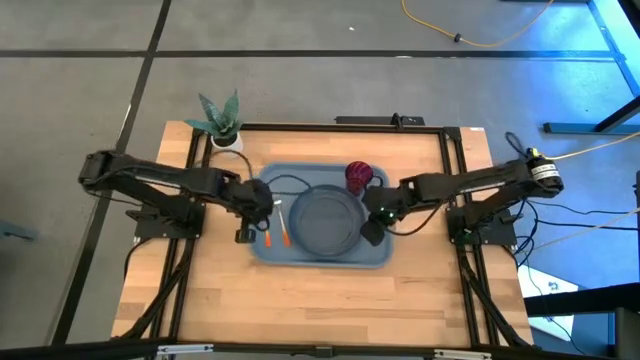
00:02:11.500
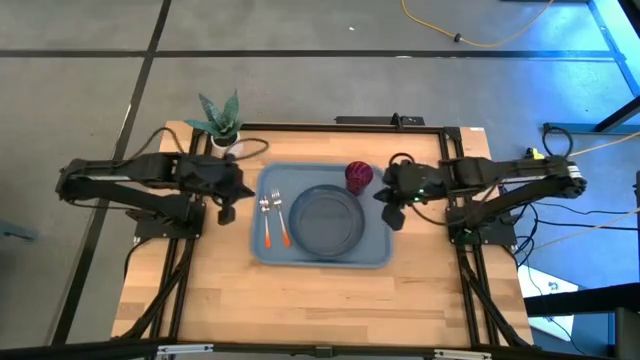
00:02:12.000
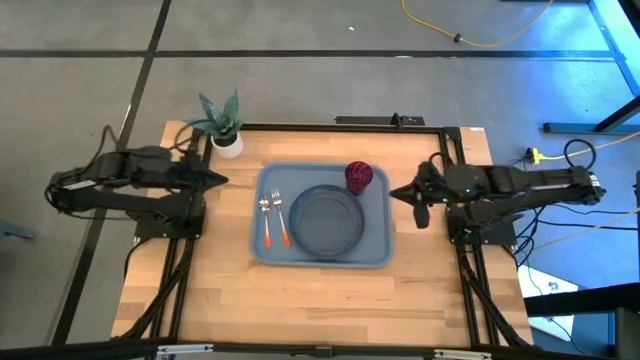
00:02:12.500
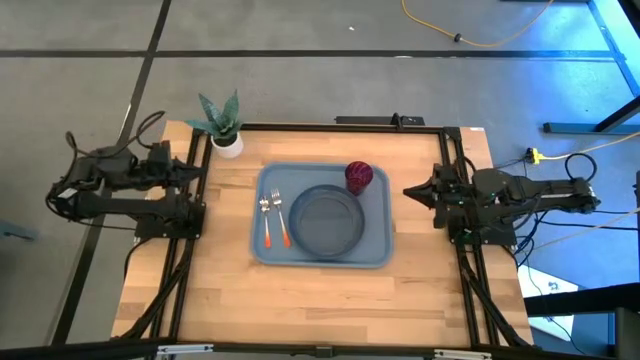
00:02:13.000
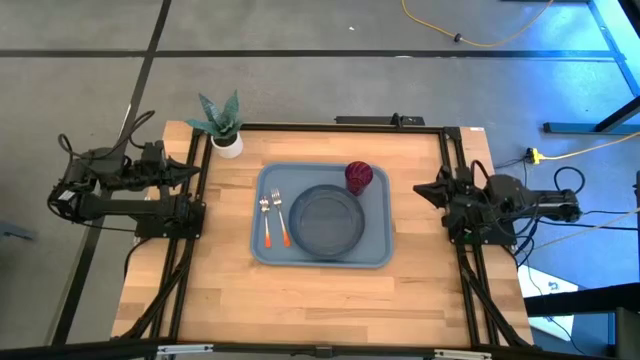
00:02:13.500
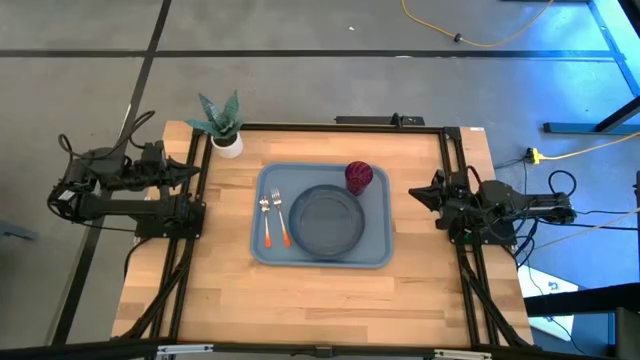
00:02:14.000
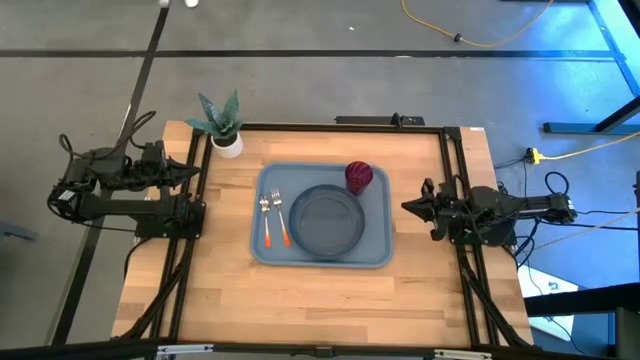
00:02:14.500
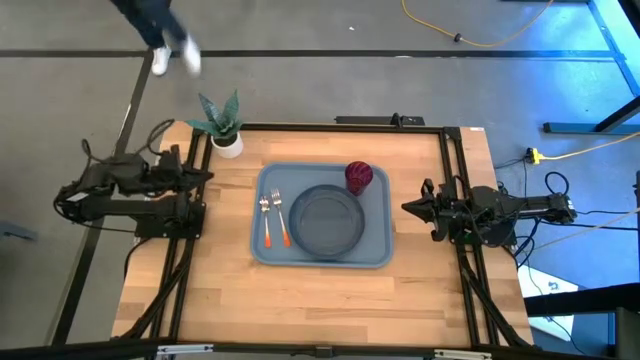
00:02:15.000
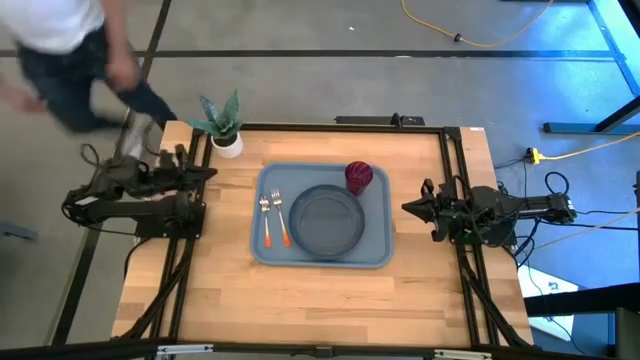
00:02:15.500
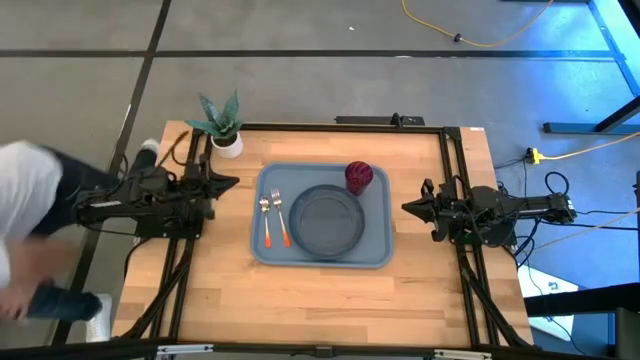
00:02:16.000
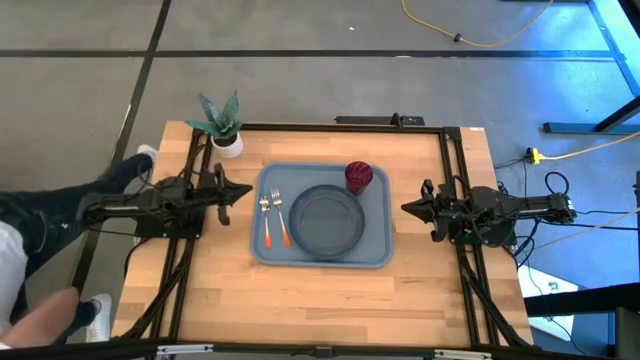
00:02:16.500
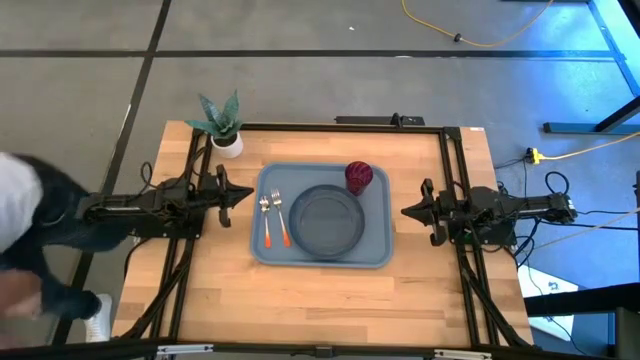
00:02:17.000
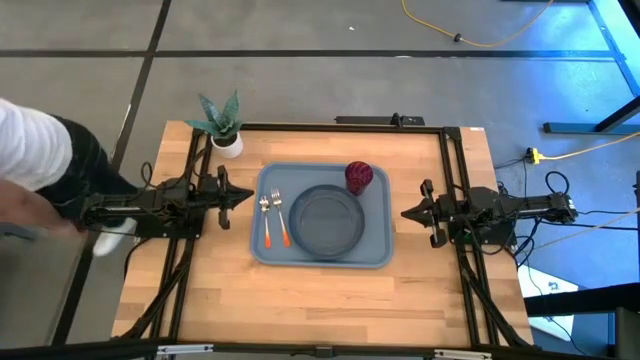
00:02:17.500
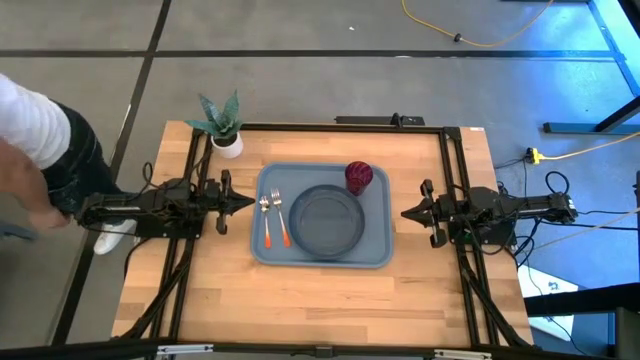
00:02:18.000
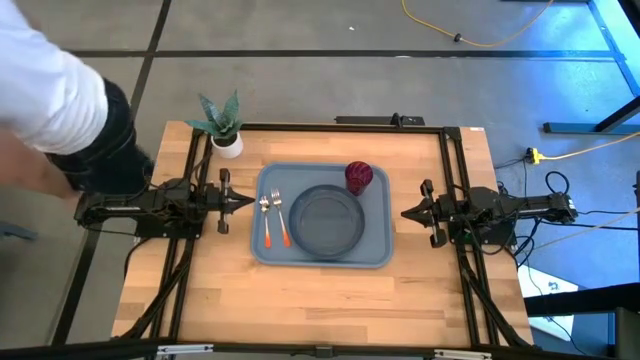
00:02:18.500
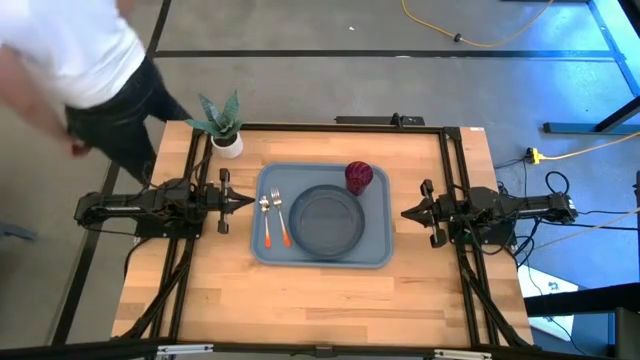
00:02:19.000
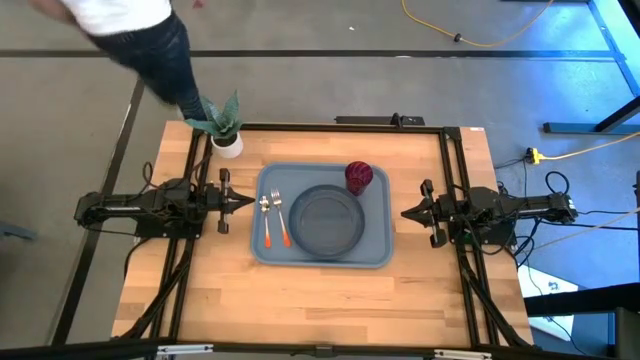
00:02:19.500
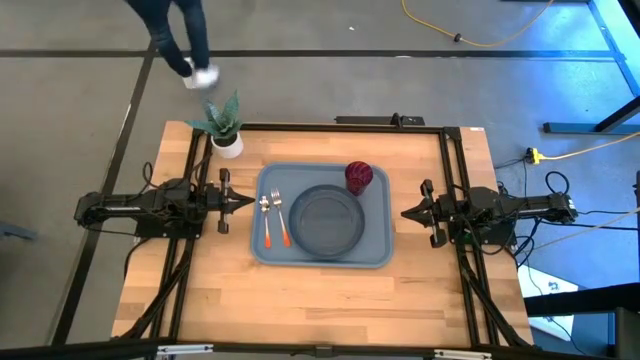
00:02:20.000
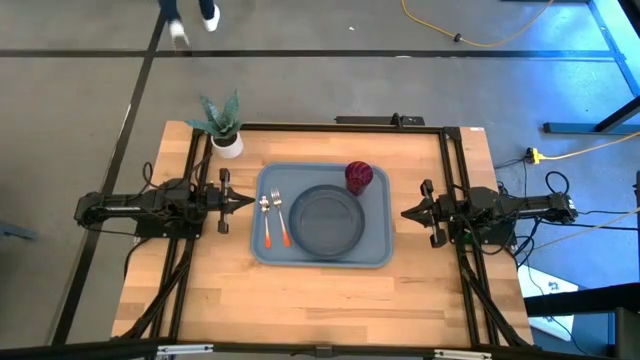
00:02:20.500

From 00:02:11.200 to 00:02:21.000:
Task: Pick and place plate/cup/fork/spoon on tray
Return to Home Position

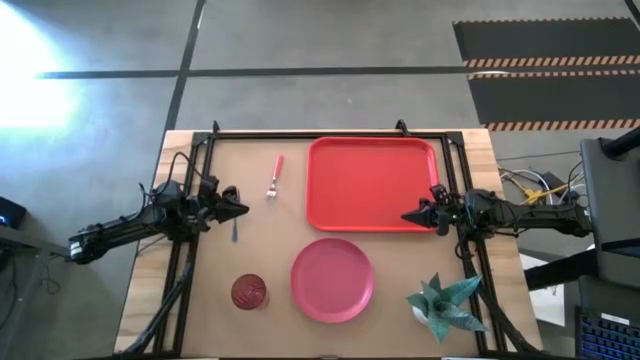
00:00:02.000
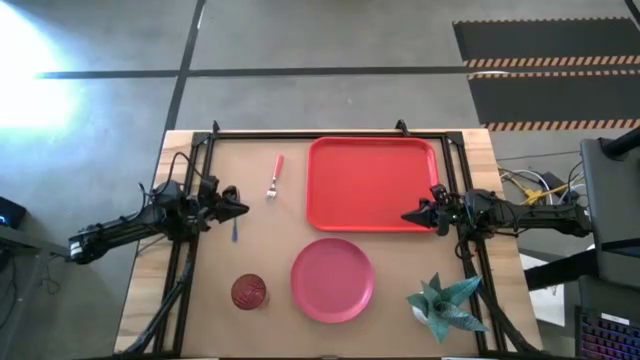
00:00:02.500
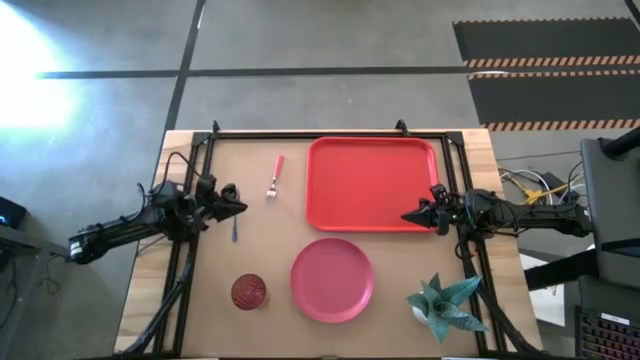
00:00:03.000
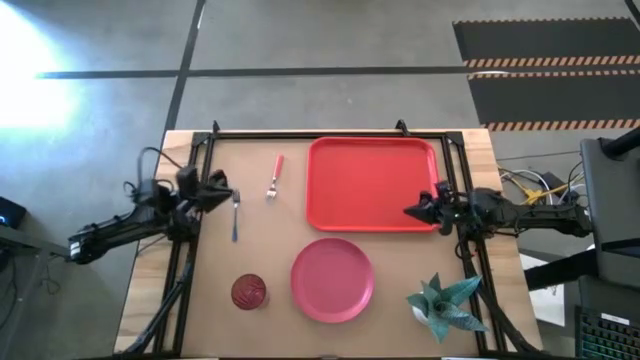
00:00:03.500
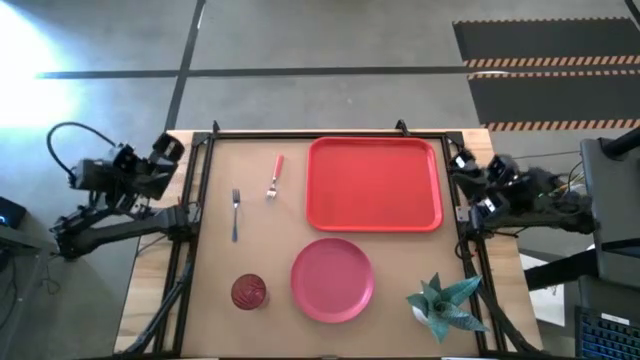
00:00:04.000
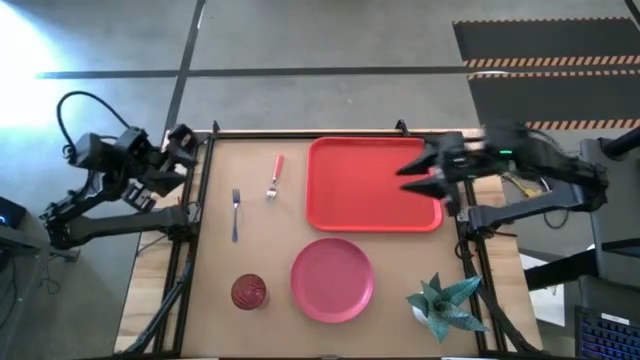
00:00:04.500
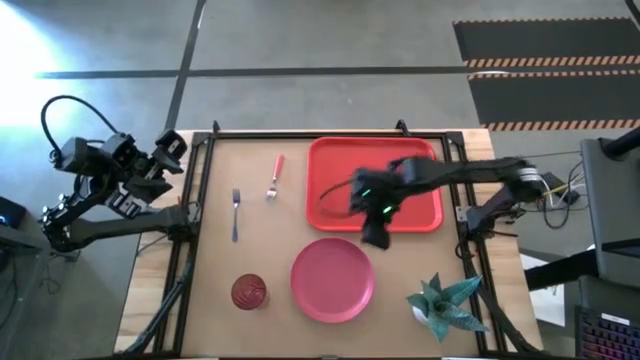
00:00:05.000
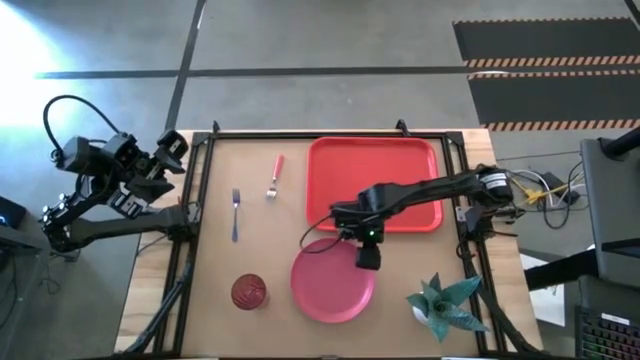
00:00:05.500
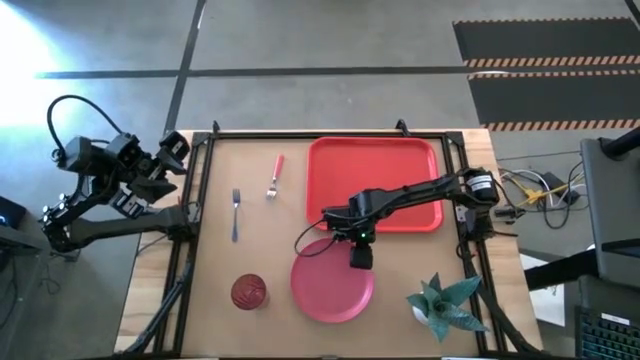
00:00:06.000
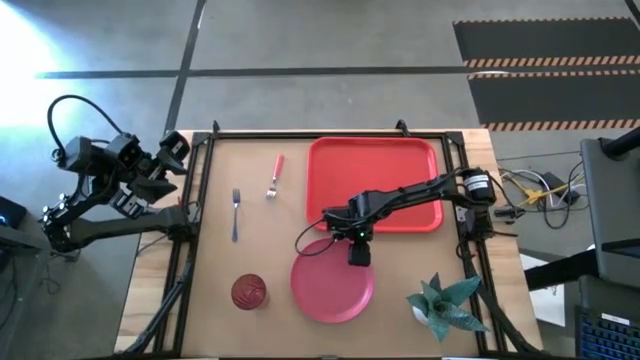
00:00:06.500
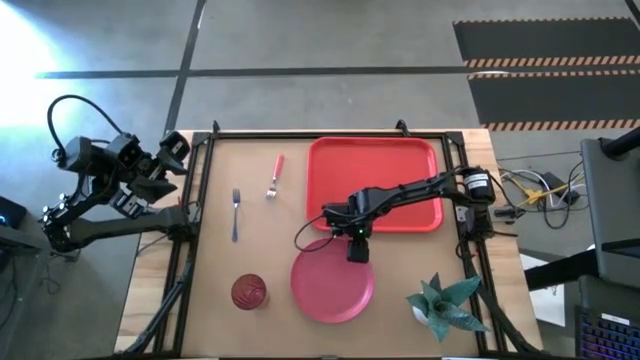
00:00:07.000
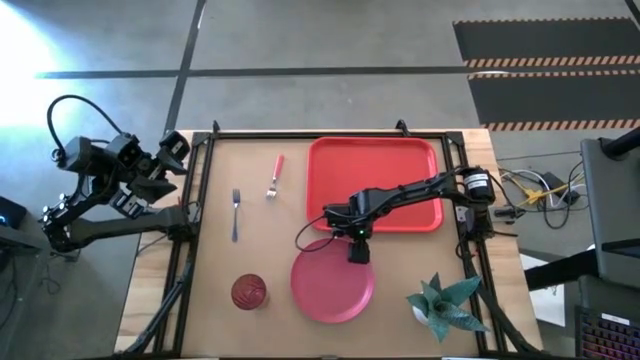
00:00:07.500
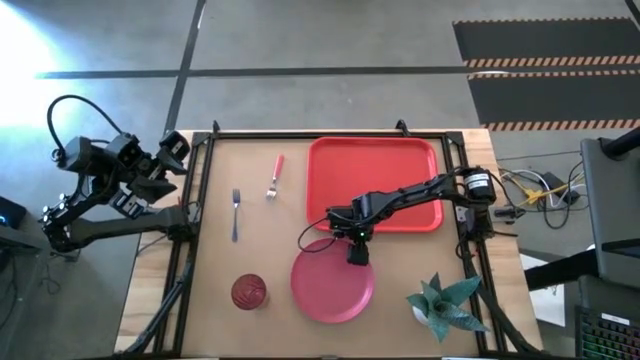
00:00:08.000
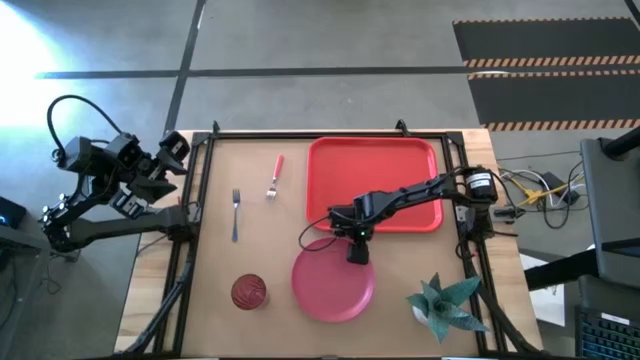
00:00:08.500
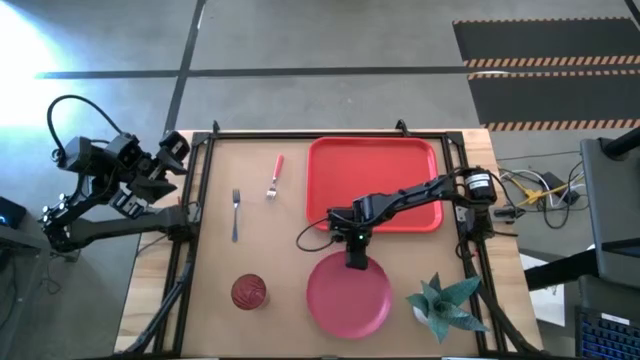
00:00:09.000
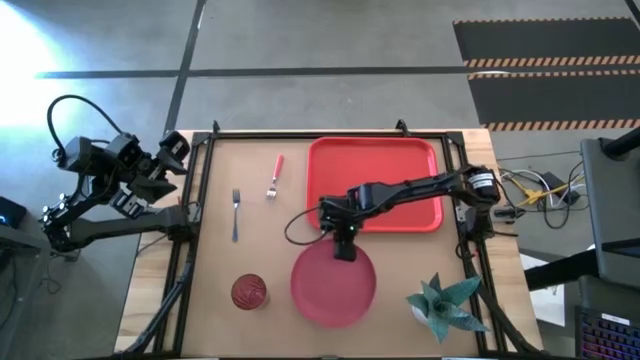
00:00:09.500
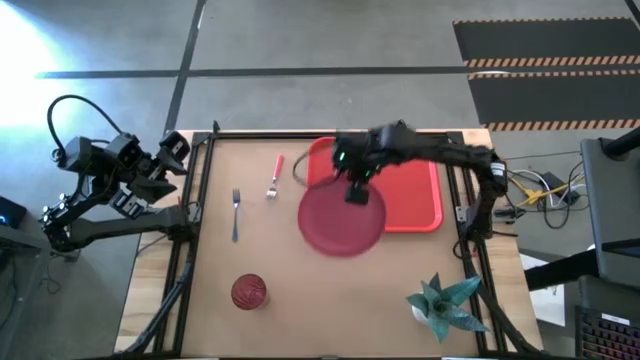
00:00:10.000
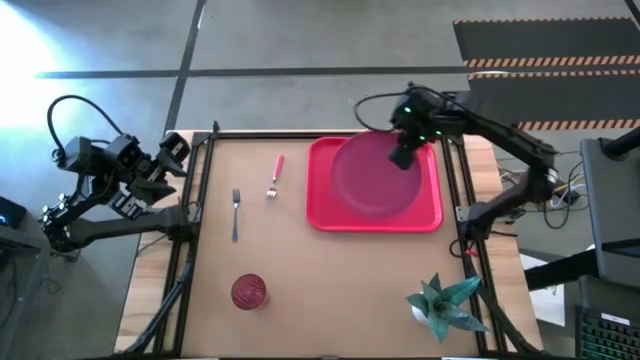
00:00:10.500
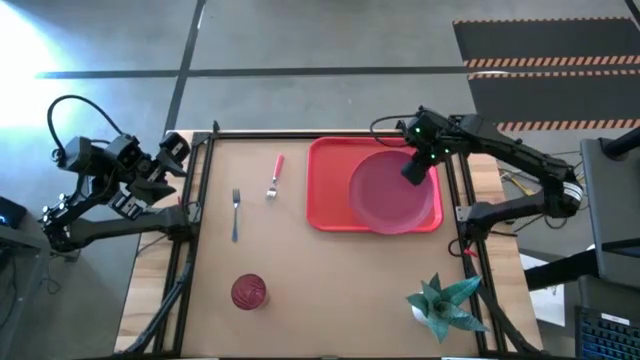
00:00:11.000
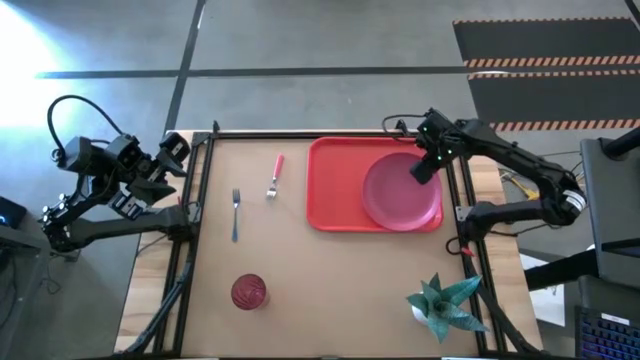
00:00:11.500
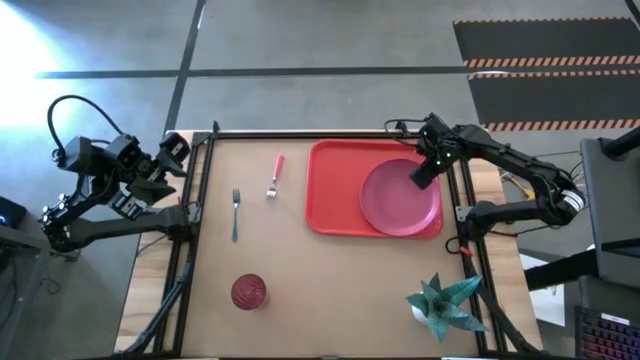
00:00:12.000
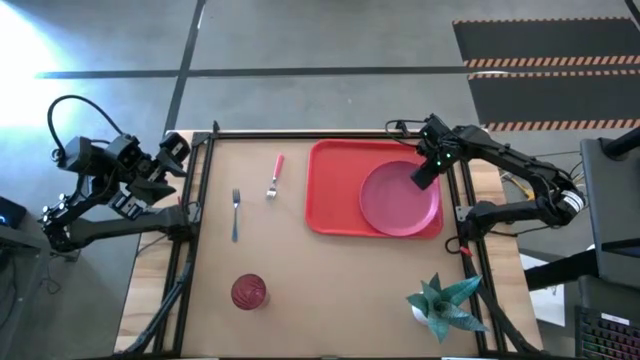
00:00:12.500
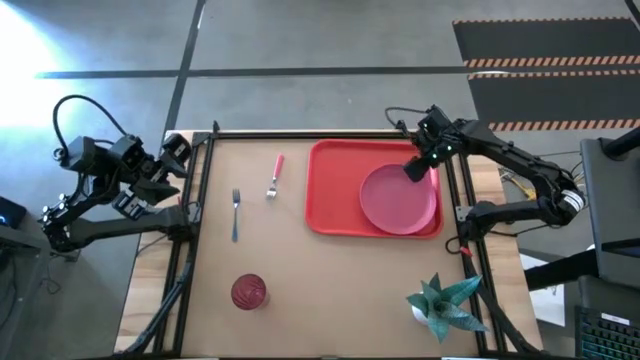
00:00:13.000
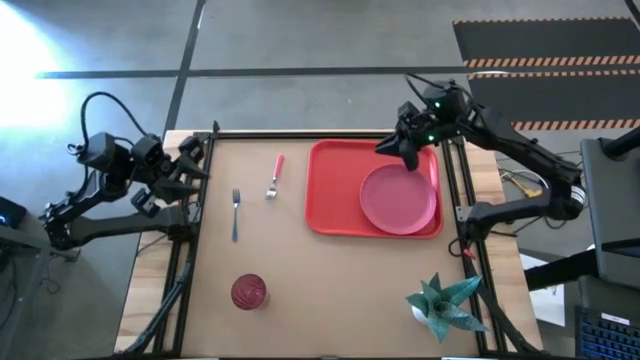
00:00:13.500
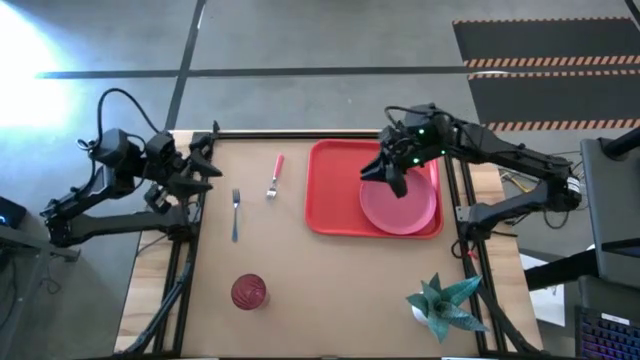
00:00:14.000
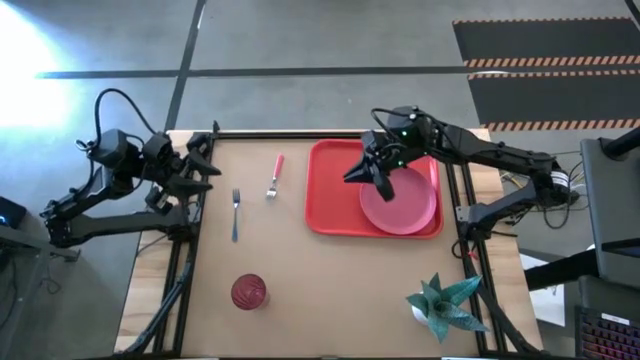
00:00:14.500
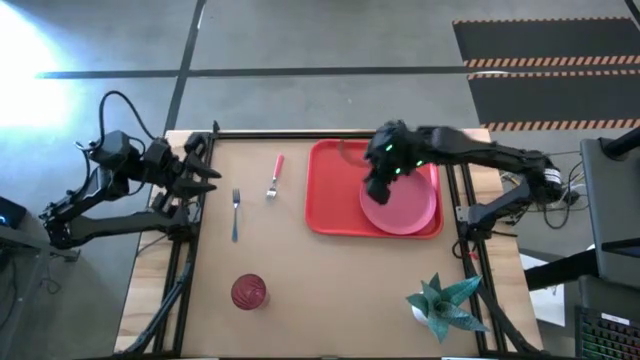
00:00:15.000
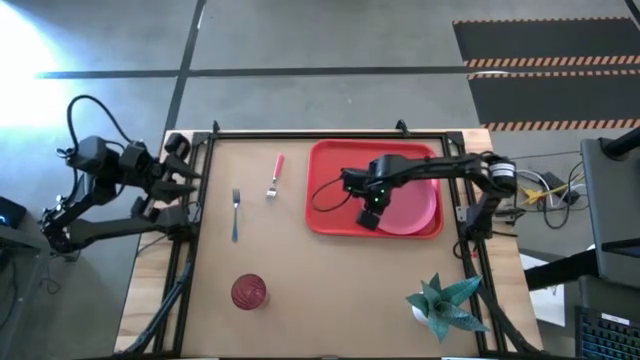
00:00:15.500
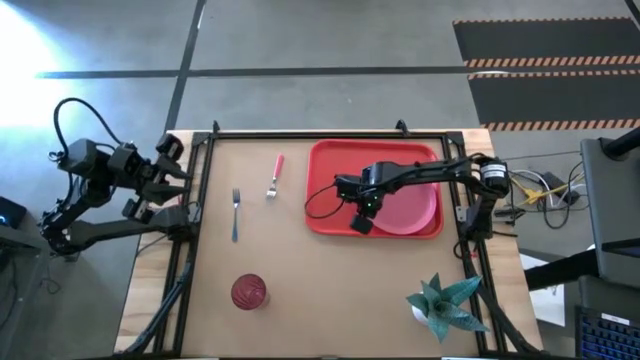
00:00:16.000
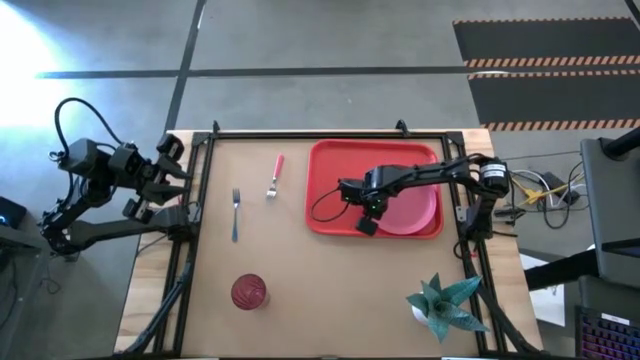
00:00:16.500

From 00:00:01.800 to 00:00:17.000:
Task: Pick and place plate/cup/fork/spoon on tray
Put the pink plate on the red tray
